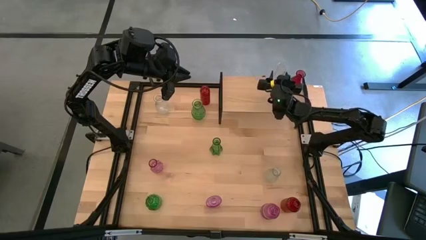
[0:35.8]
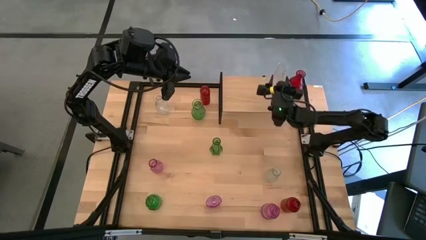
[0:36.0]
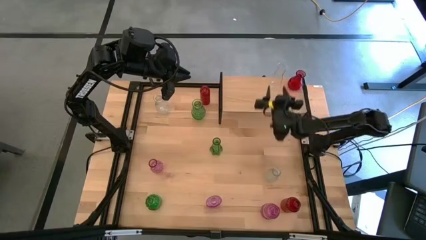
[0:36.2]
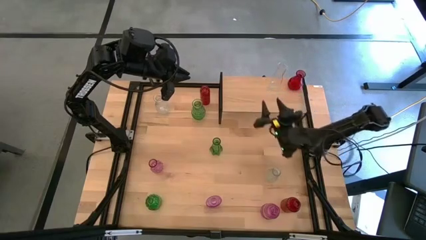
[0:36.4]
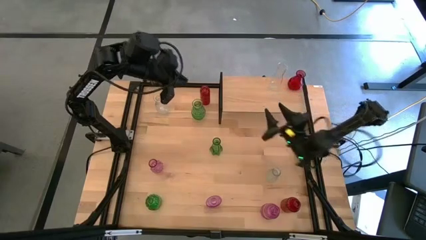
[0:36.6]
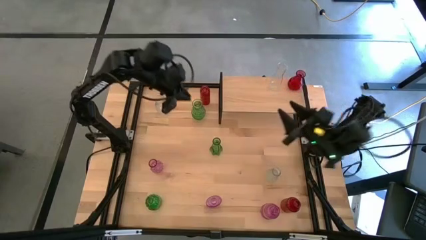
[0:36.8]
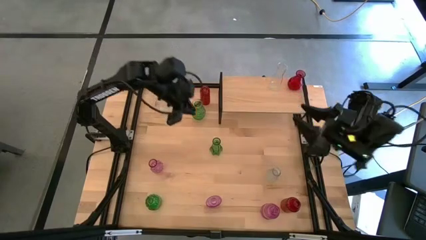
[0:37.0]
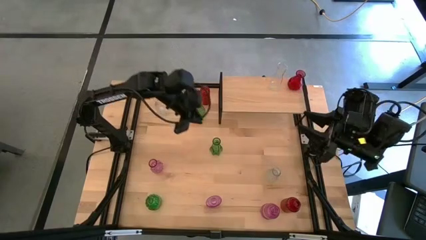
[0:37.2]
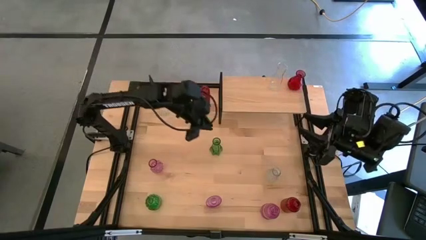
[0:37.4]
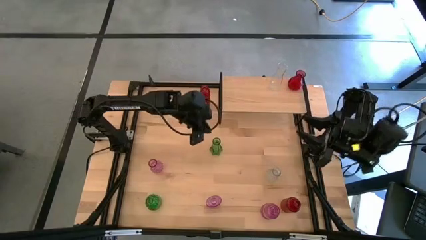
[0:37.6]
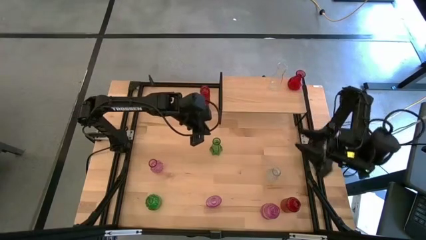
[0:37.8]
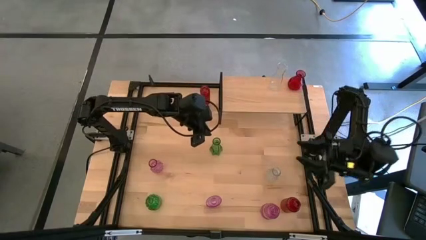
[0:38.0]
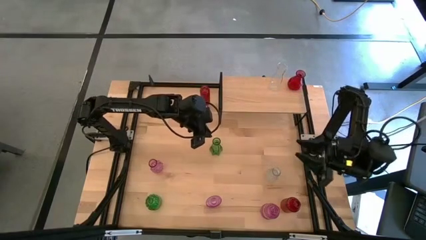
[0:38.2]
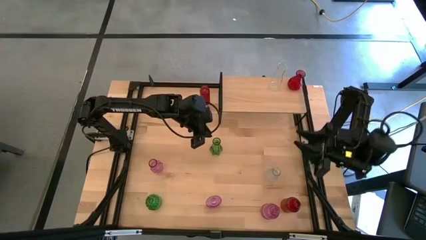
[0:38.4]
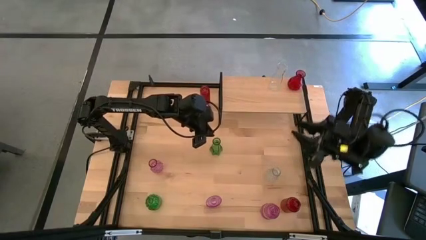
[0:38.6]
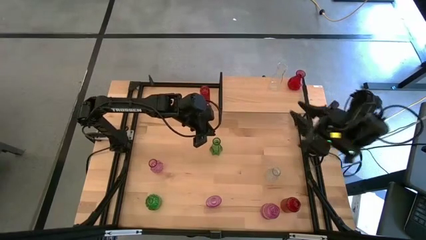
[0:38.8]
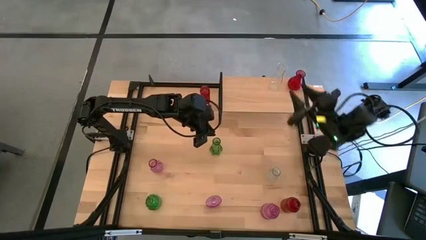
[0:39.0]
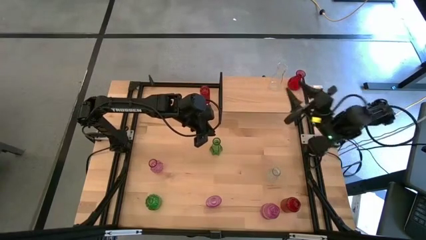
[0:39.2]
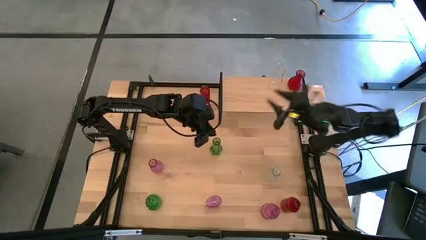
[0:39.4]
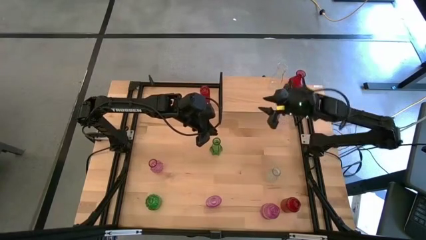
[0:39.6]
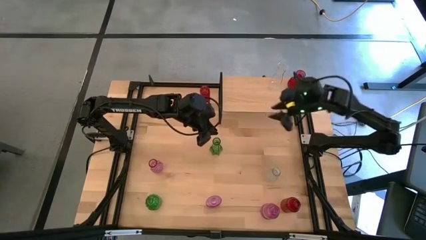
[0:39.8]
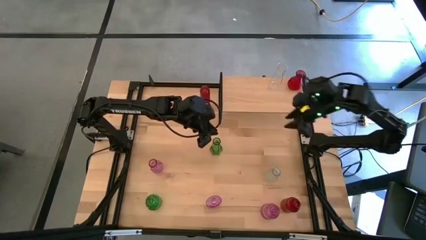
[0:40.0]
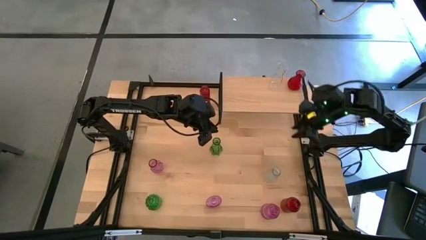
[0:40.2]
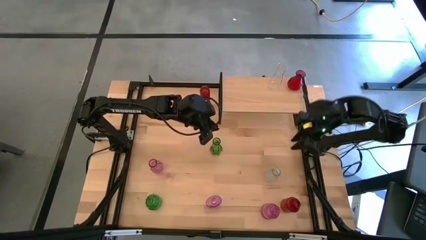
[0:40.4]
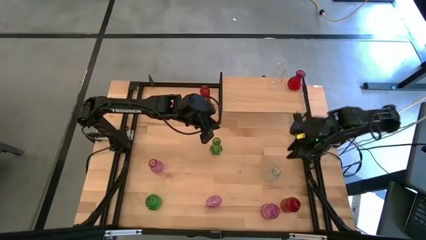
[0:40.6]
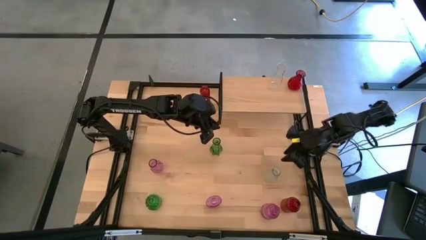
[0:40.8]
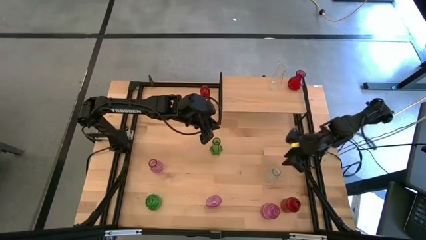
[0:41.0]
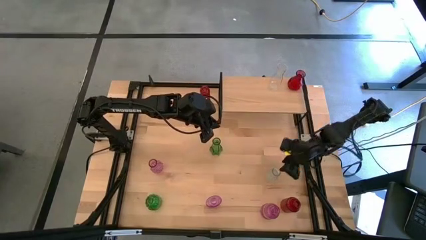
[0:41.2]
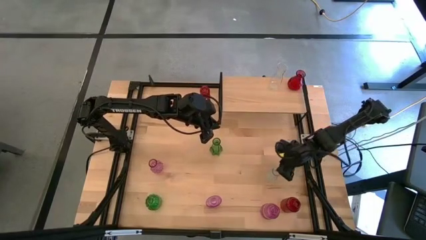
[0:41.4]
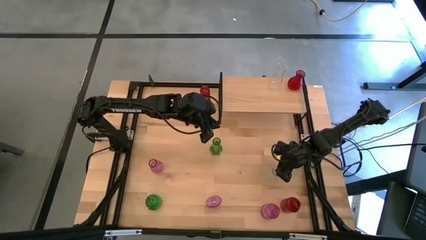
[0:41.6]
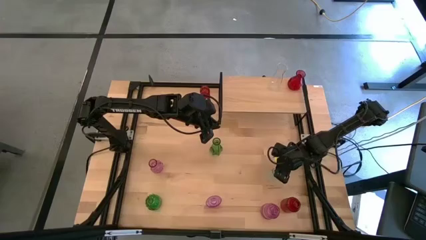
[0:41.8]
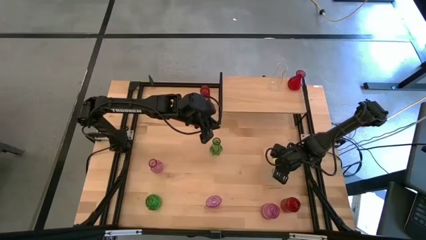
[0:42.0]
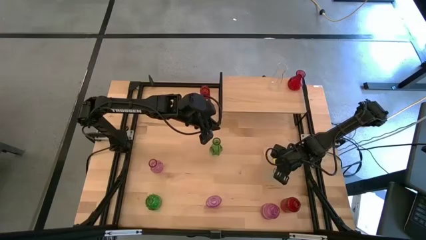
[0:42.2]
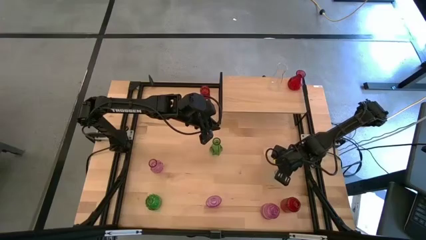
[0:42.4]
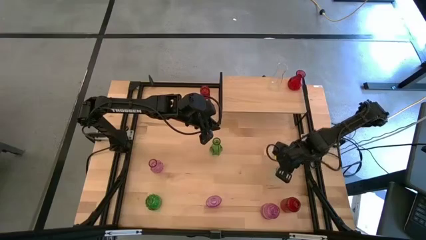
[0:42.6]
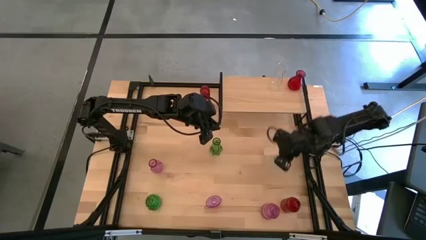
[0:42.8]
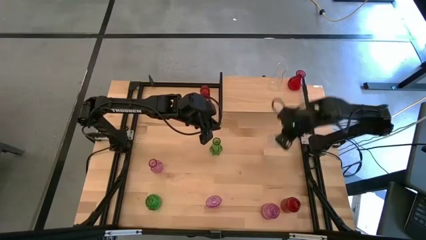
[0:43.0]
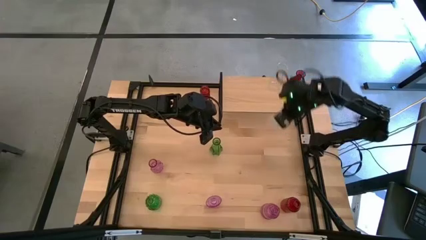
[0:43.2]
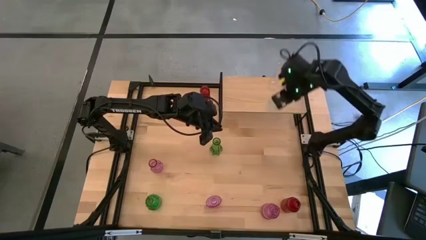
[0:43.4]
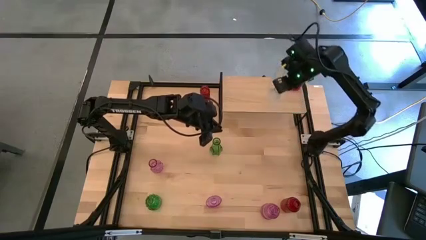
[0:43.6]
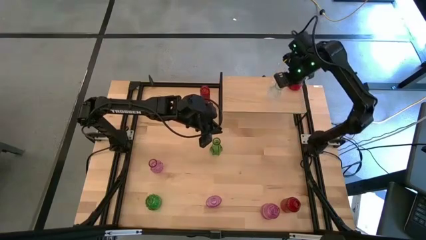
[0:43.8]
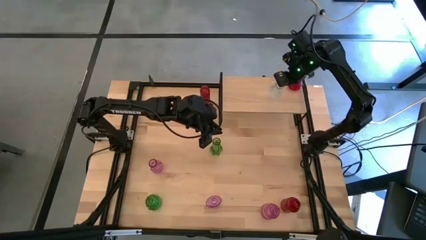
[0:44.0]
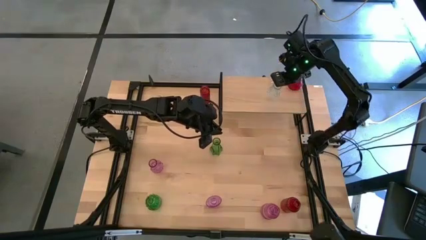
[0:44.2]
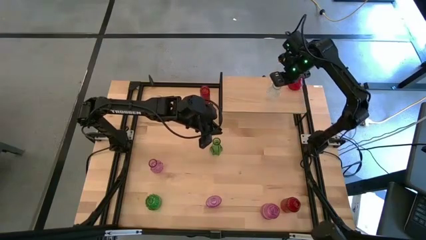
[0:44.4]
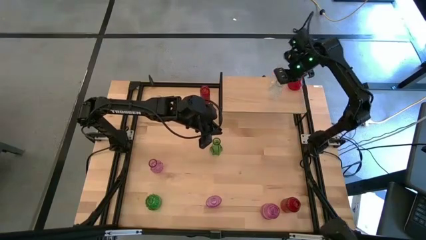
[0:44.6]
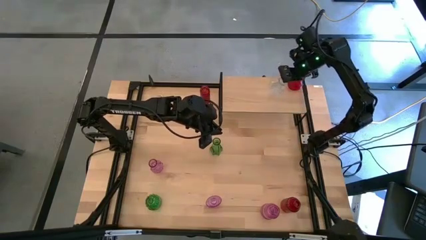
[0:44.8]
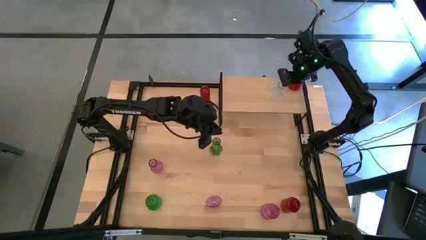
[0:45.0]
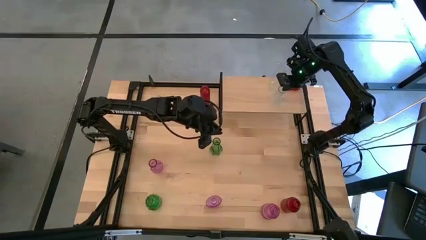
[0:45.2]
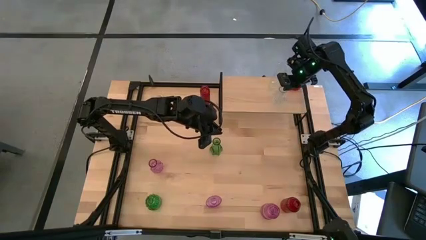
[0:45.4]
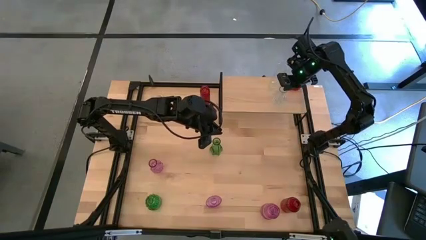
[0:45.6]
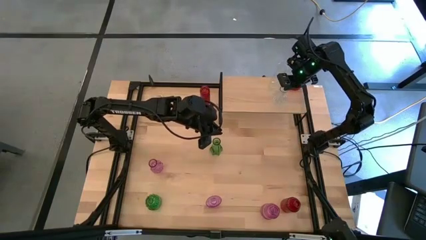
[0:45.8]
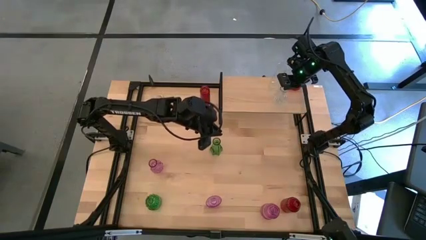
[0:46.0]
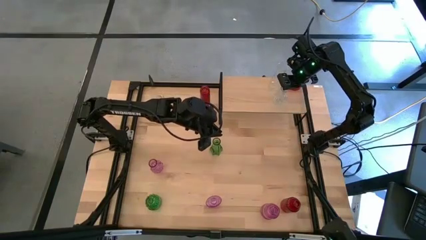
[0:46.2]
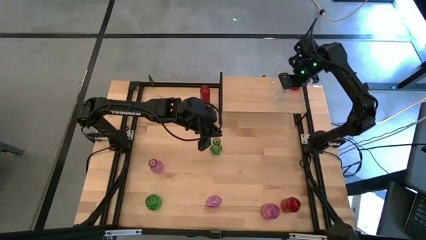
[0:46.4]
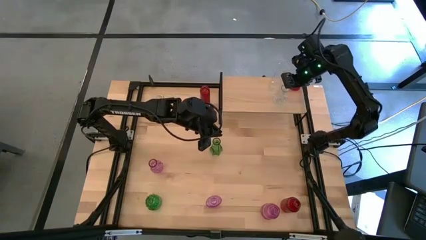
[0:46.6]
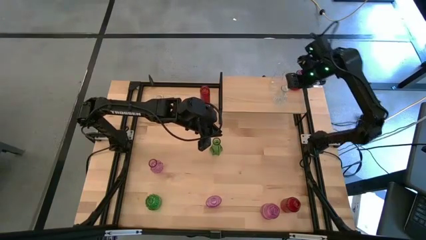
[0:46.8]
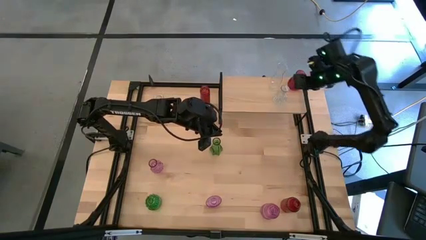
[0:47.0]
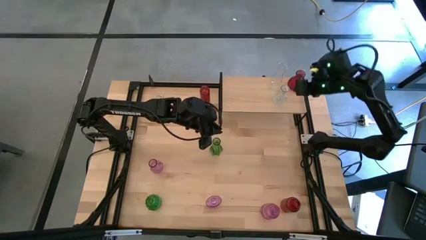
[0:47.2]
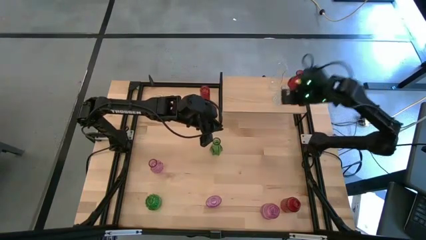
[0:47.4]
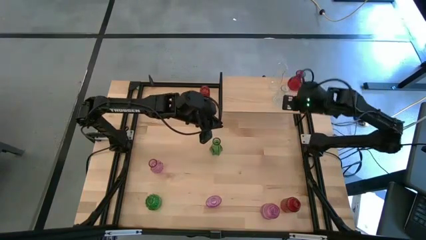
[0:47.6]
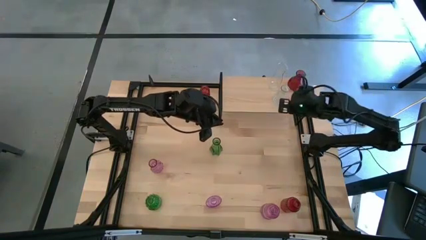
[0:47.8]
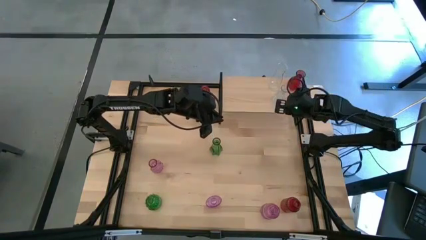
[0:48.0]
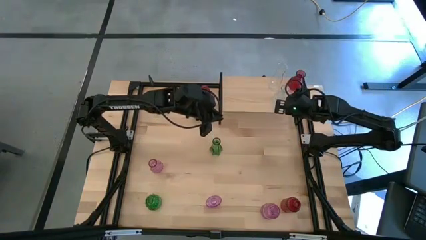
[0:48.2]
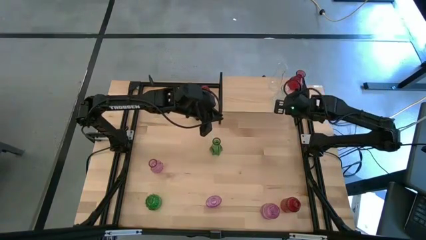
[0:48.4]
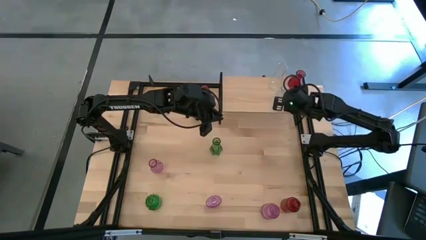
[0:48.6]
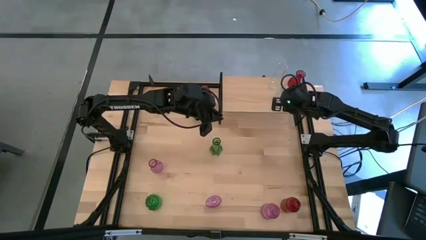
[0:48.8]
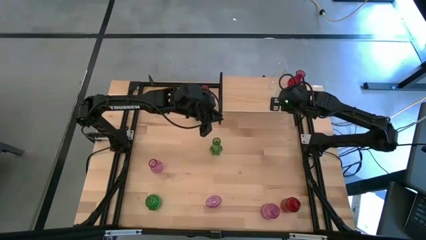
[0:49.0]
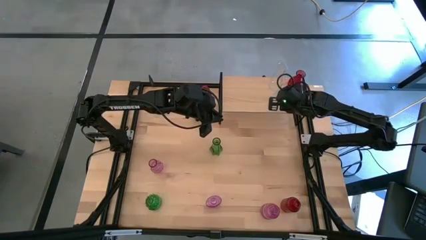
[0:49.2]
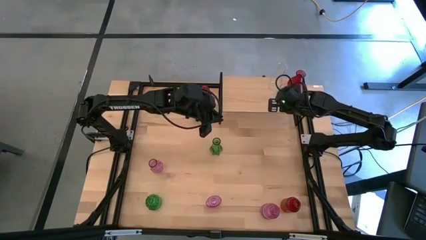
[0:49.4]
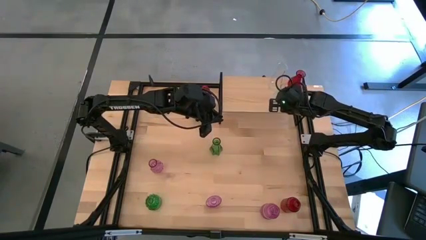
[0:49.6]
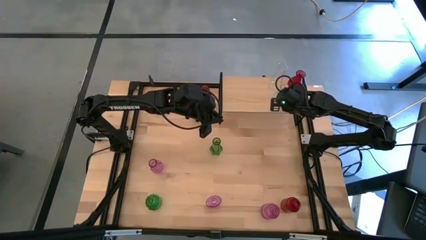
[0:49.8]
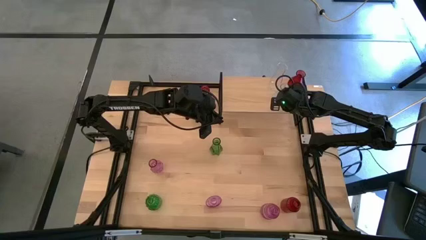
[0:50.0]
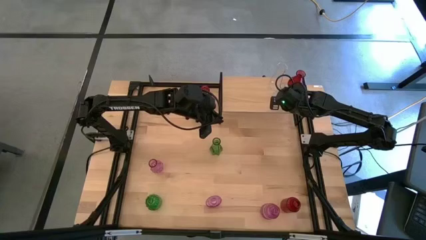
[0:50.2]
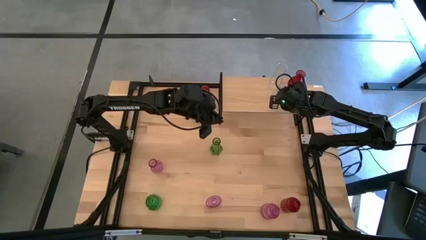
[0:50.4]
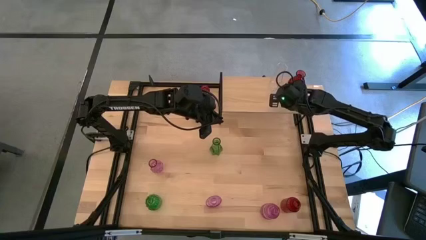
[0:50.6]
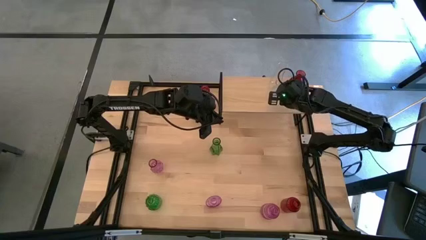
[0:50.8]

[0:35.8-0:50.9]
Task: sort vases onto shelf
Put the right transparent vase on the shelf aligned with the other transparent vase

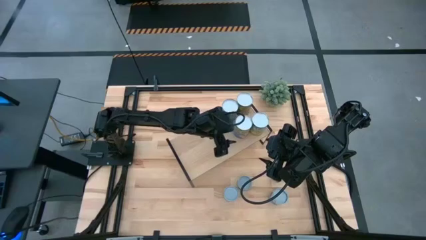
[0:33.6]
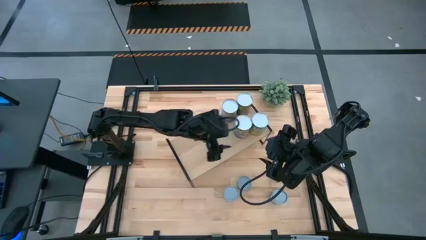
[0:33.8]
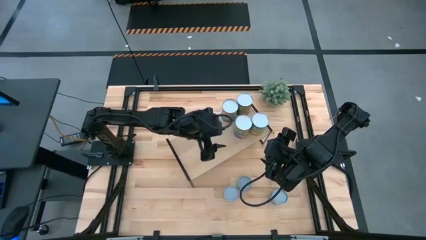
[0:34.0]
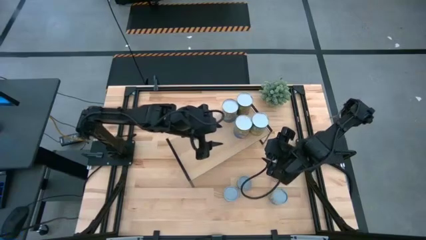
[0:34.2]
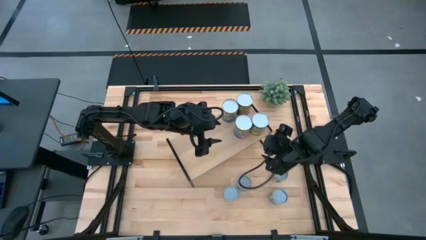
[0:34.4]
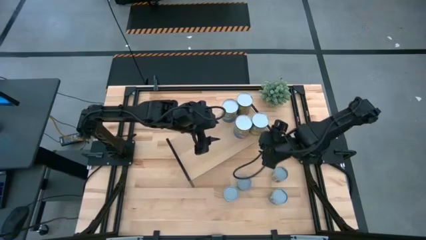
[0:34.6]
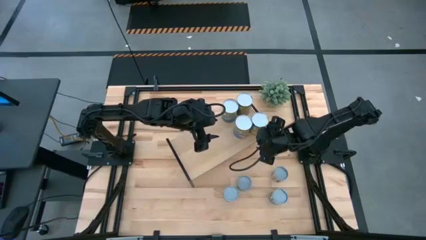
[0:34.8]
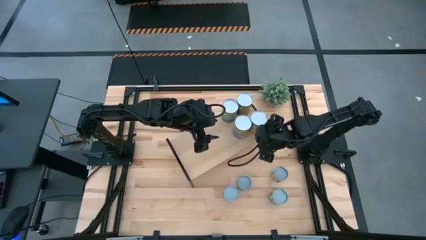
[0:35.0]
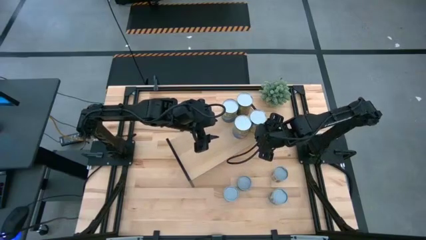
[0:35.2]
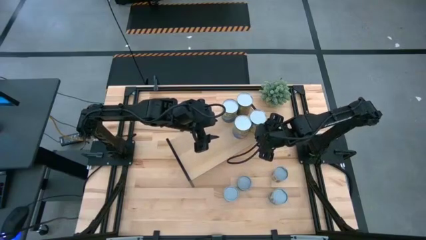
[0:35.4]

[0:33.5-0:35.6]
Task: Pick and place cans onto a shelf
Adjust the big canned carrots on the shelf
